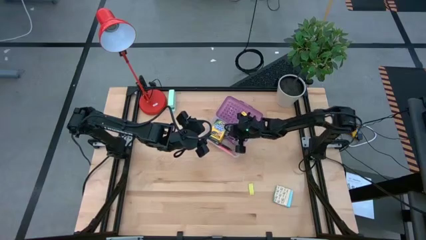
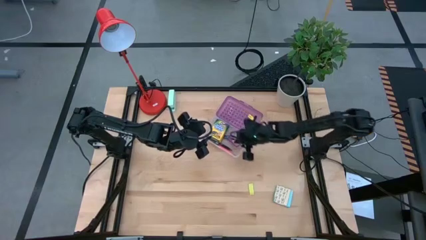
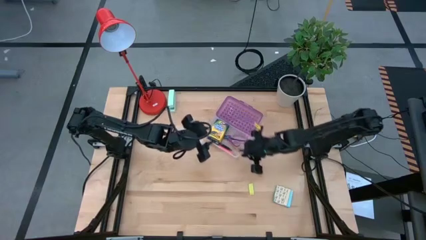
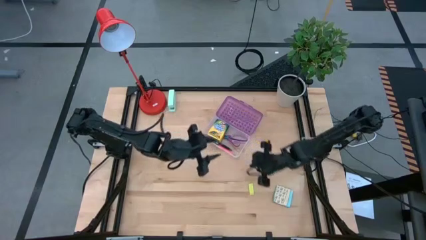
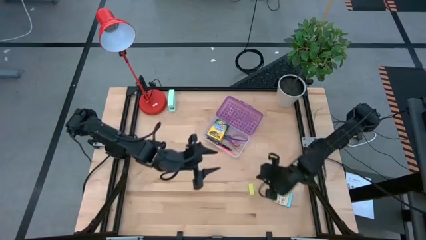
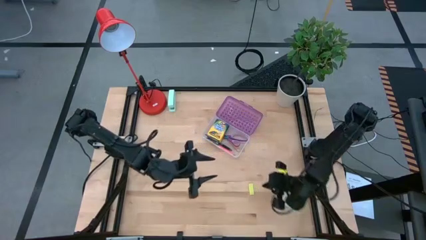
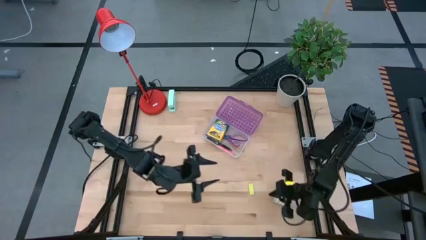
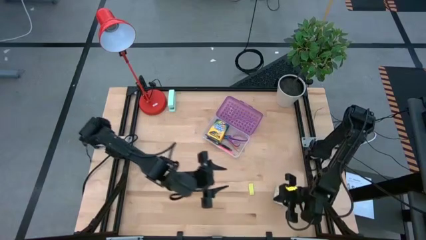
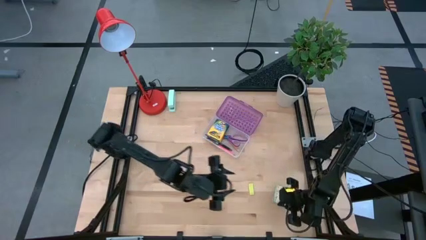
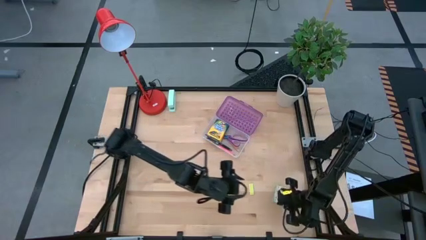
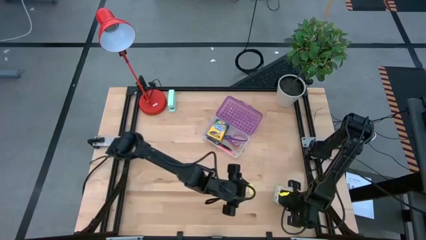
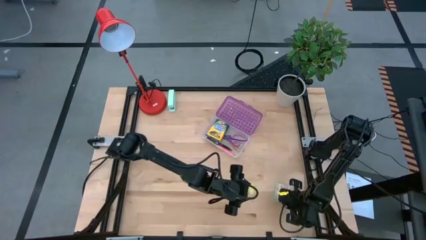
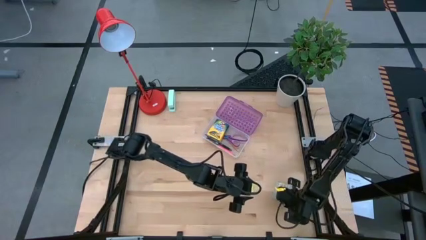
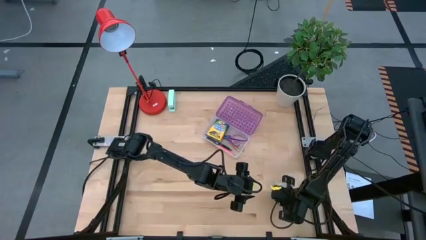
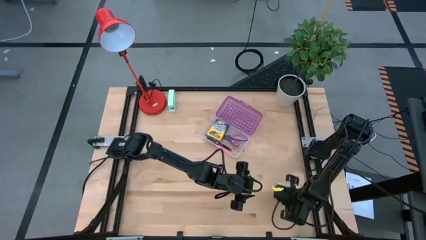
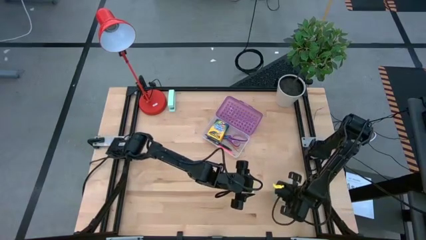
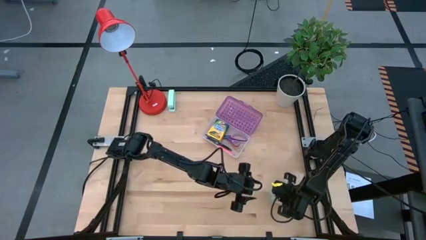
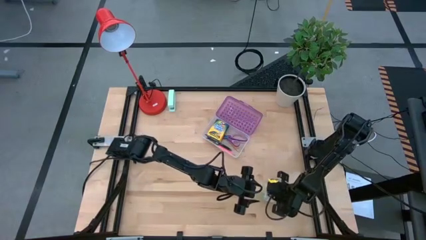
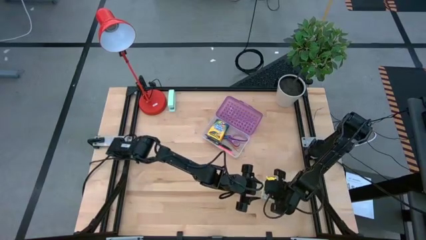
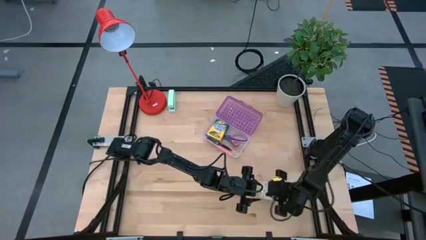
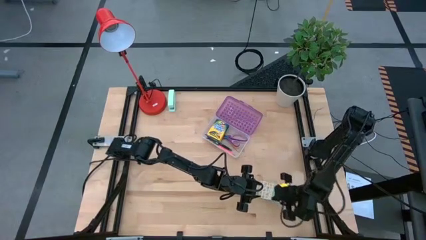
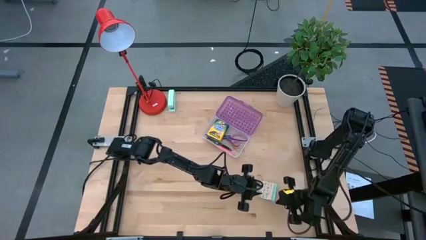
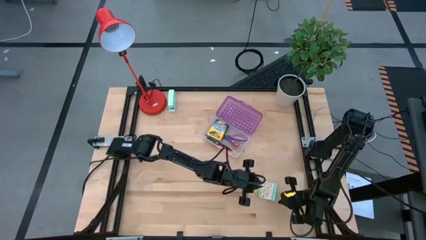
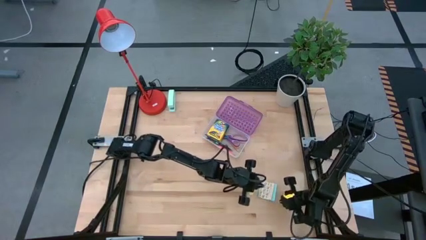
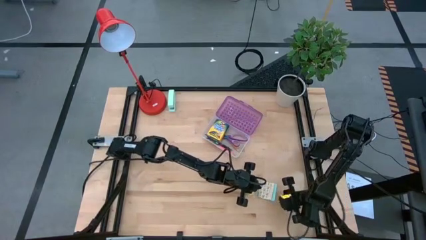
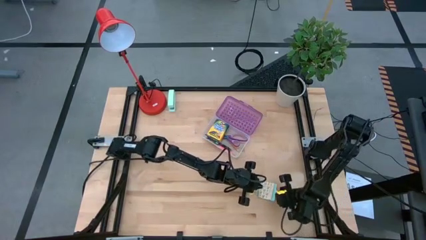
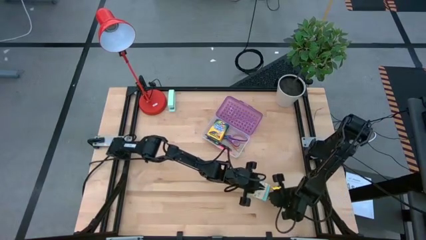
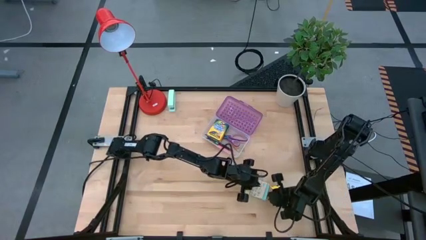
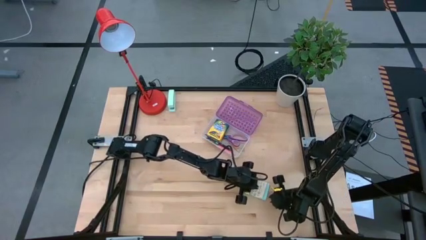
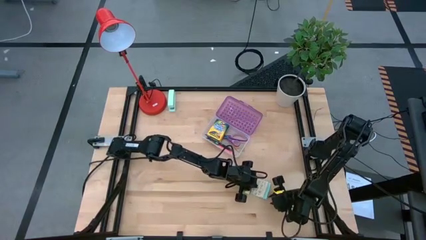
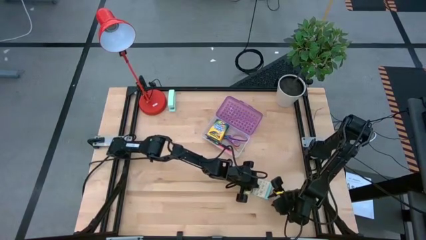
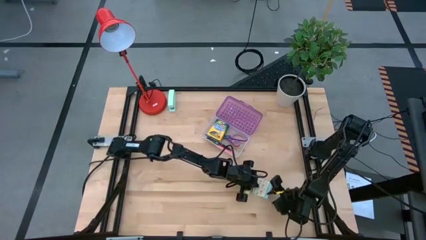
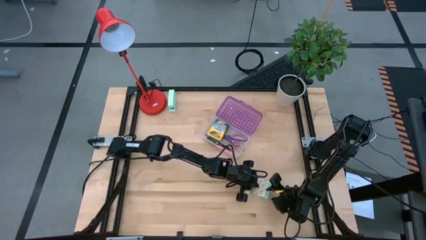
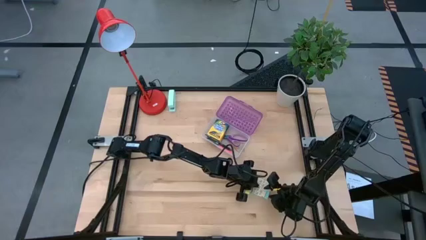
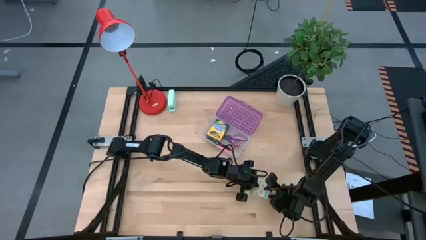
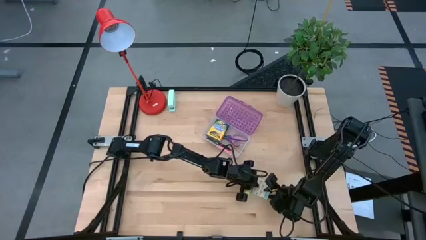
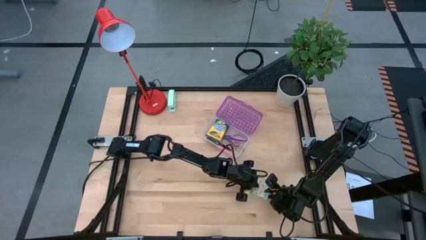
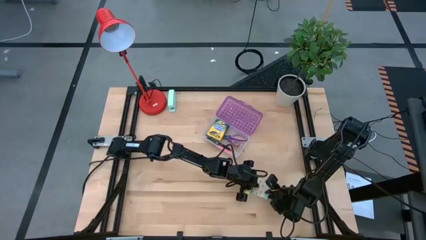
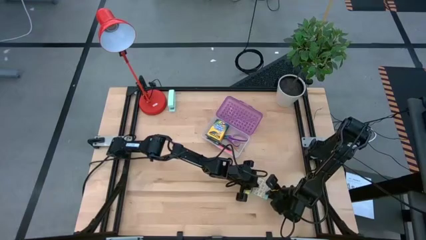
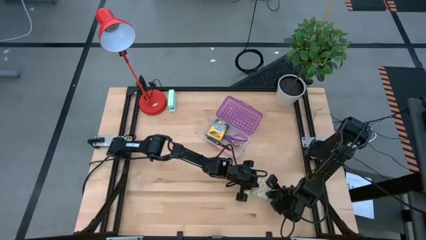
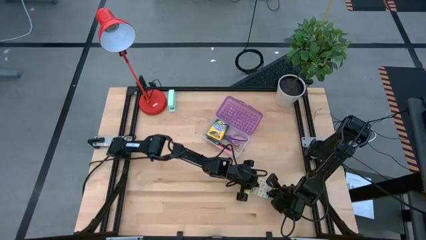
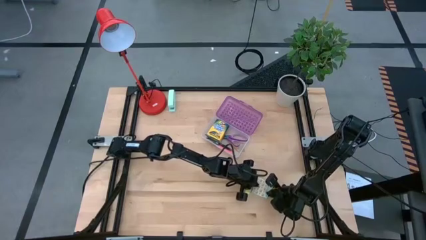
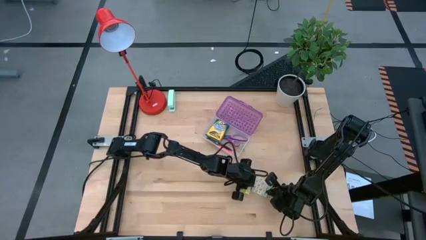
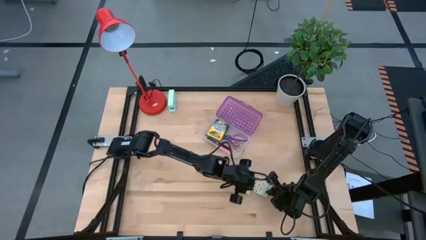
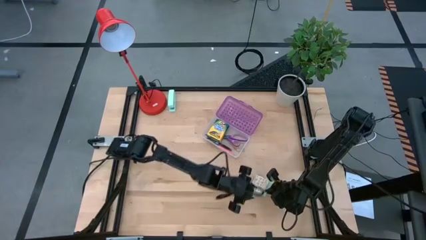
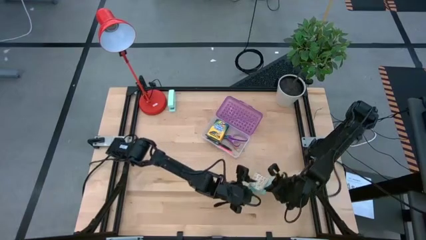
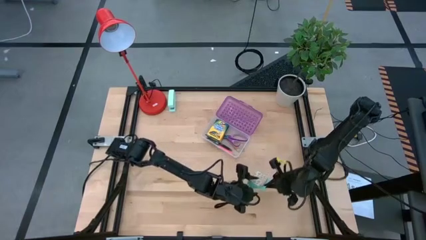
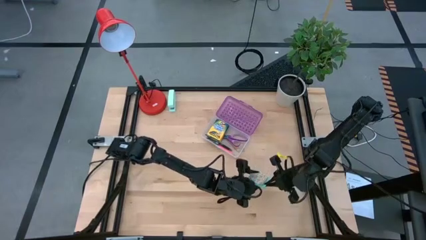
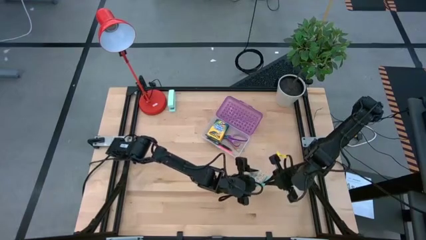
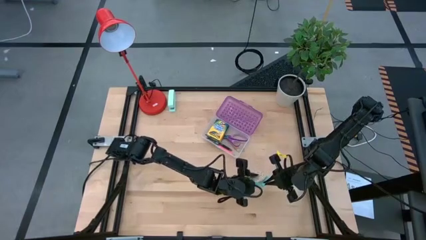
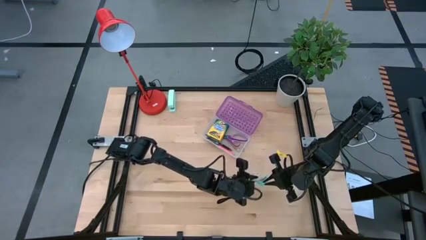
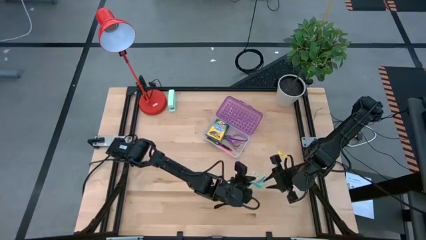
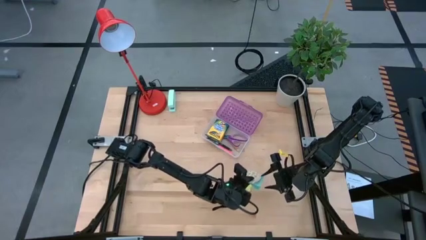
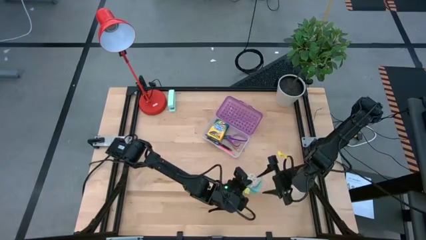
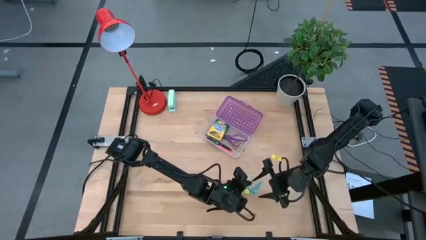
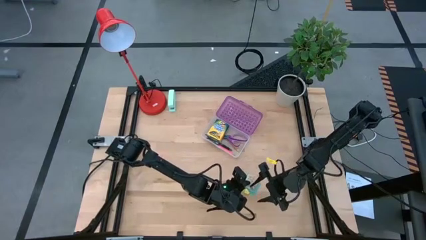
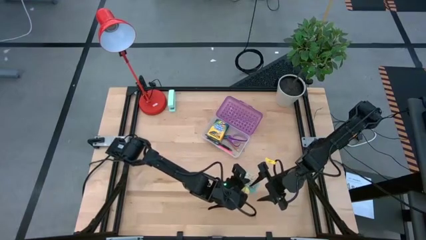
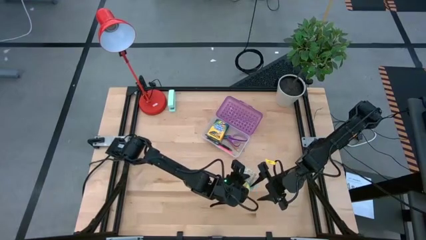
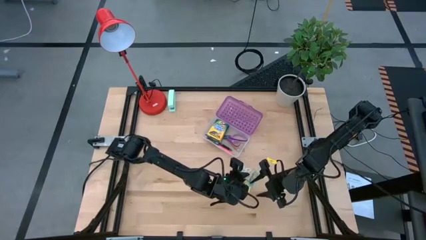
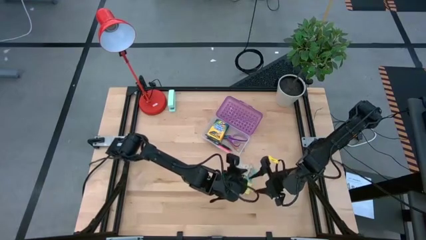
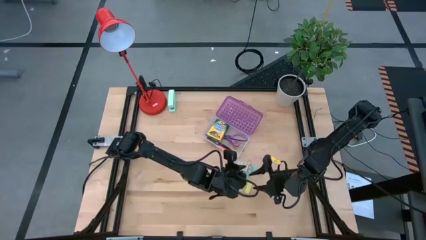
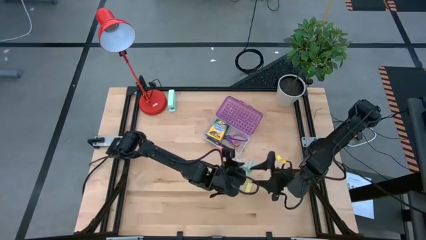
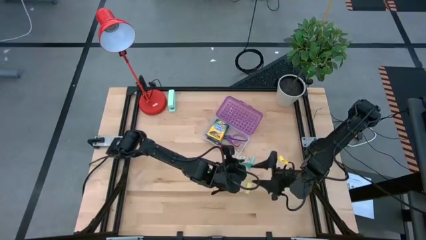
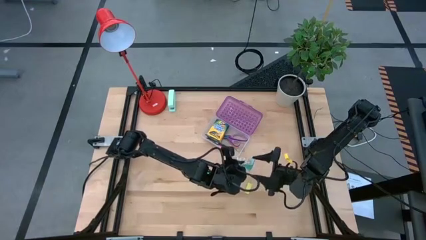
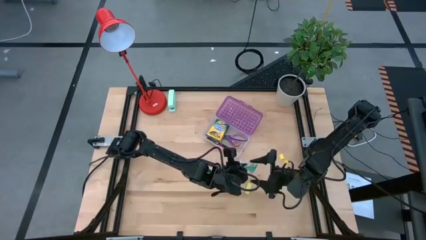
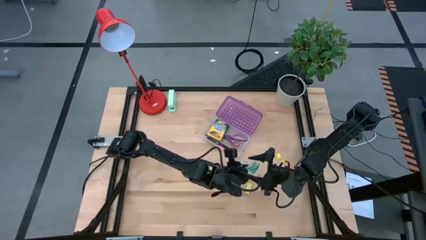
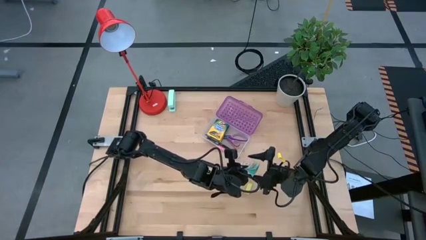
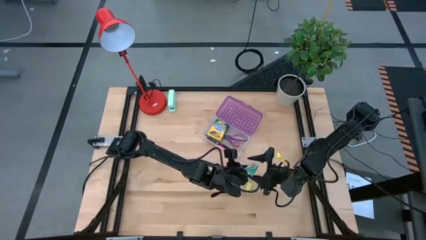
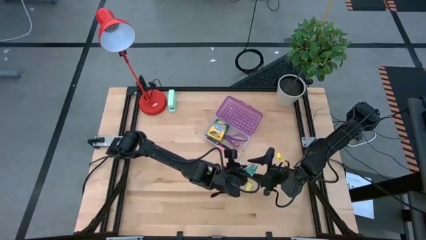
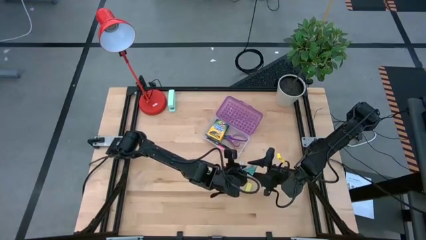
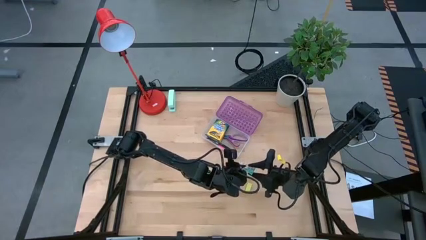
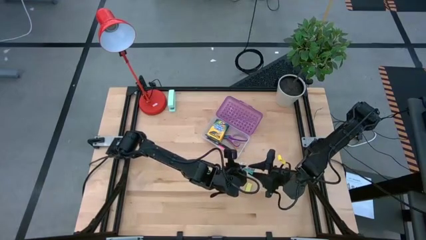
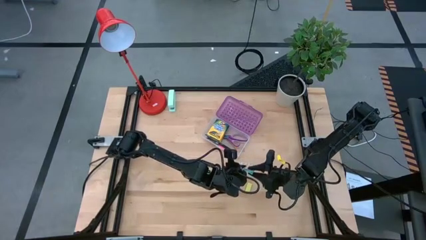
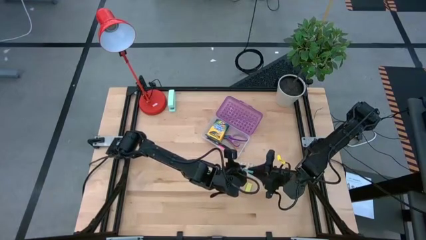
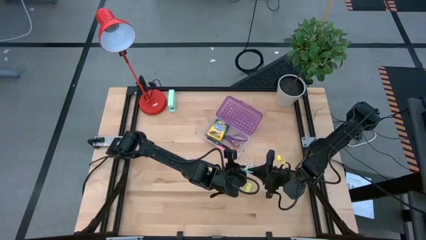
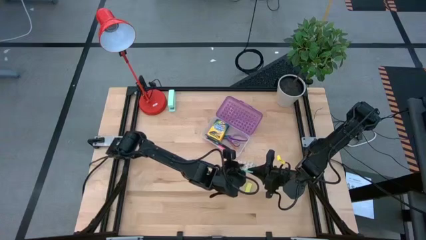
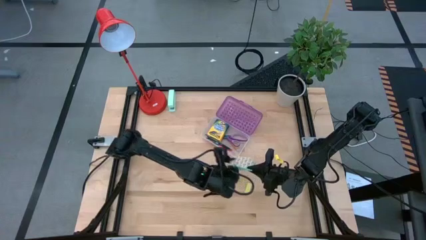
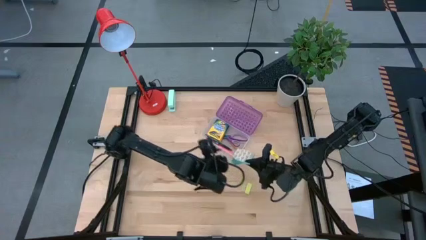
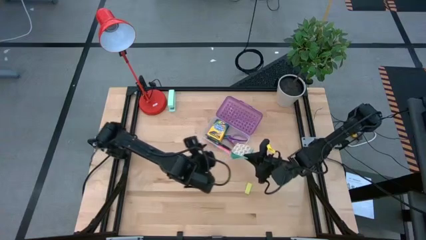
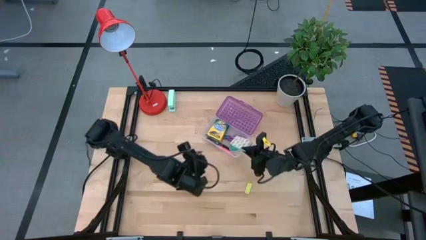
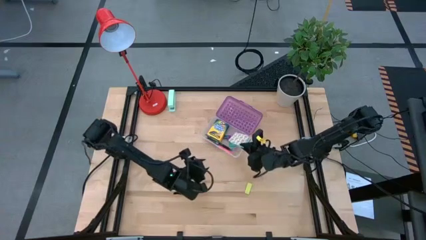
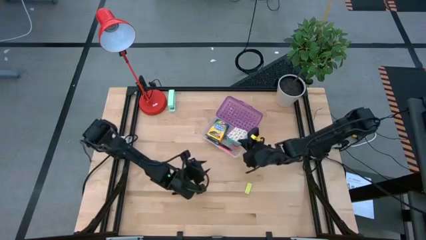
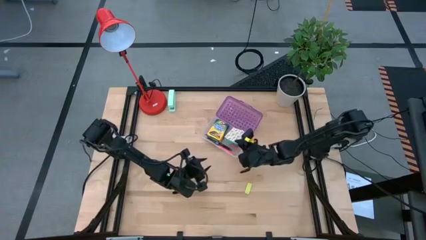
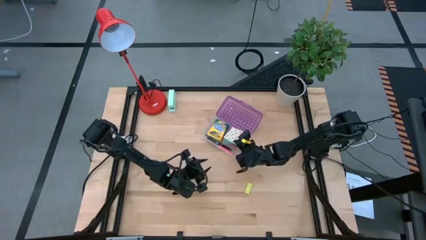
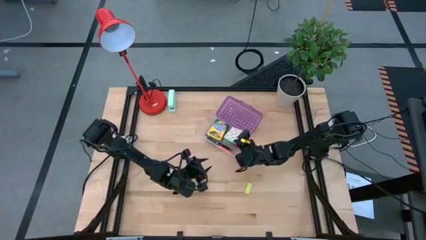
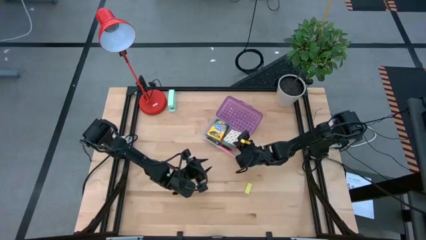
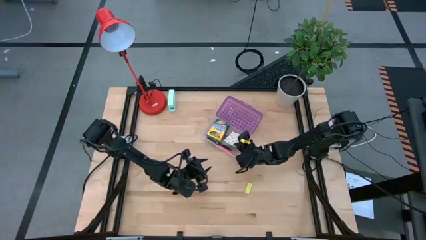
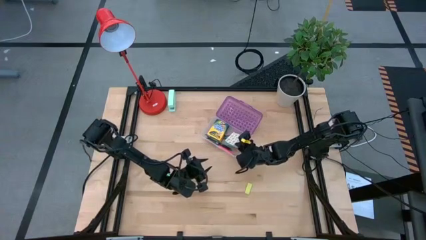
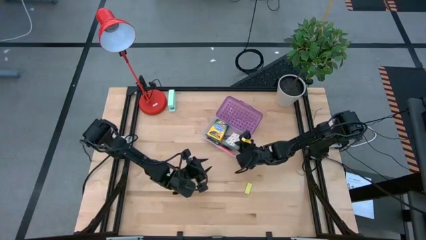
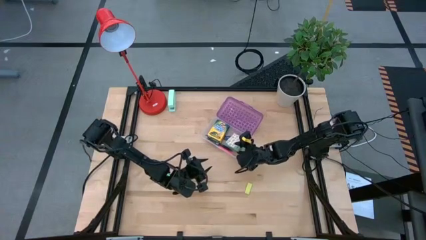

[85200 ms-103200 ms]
Task: Pack school essentials
Put the blue sticky notes into the purple supply box
